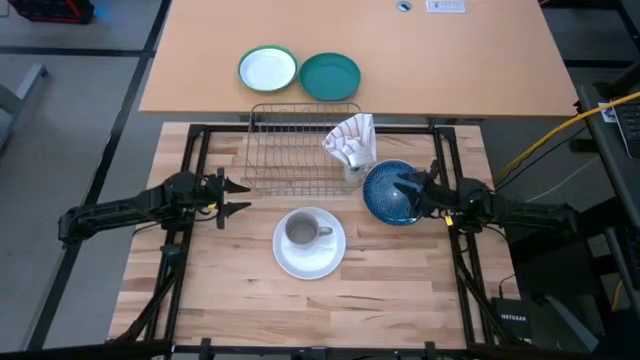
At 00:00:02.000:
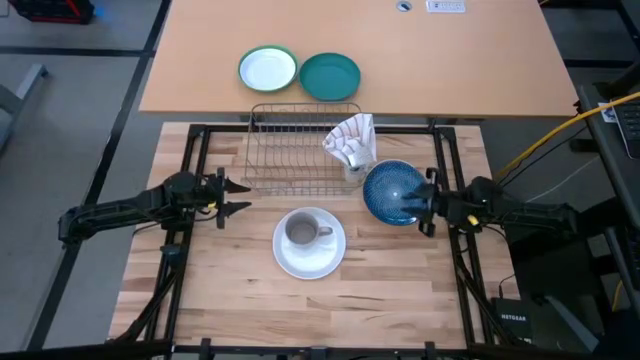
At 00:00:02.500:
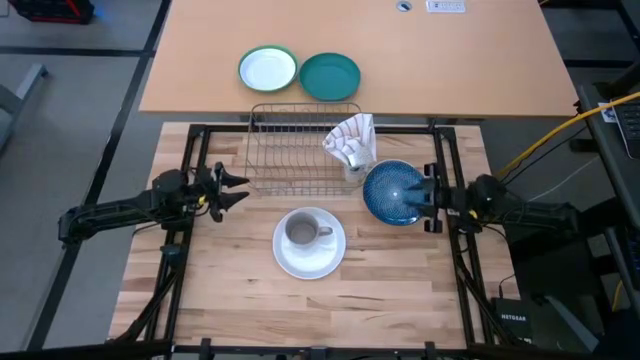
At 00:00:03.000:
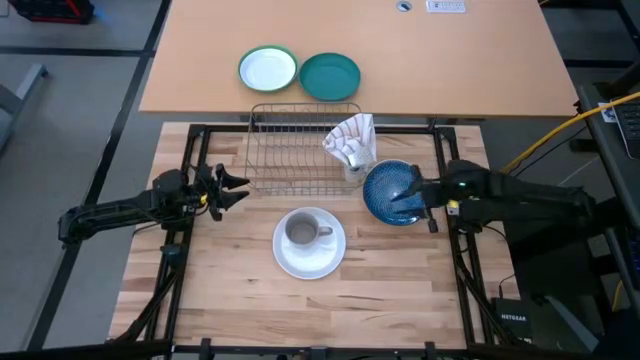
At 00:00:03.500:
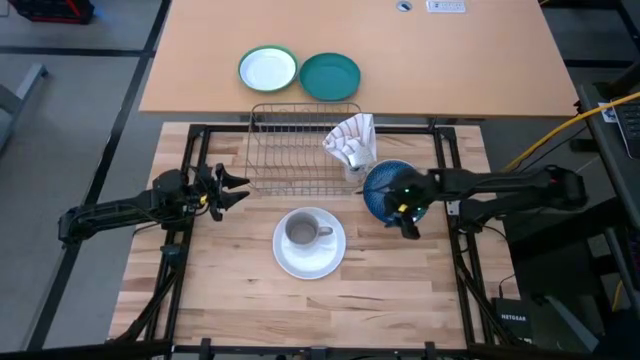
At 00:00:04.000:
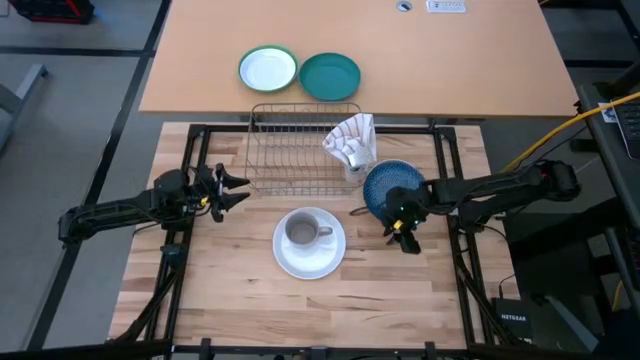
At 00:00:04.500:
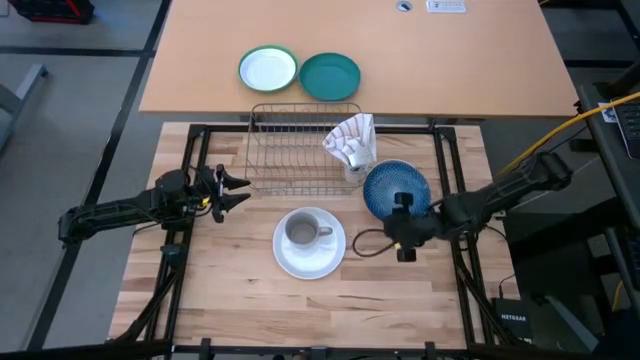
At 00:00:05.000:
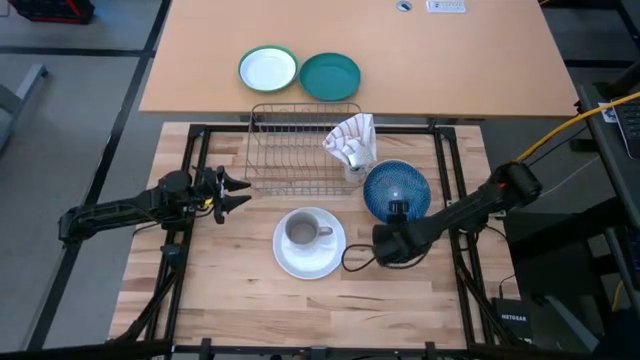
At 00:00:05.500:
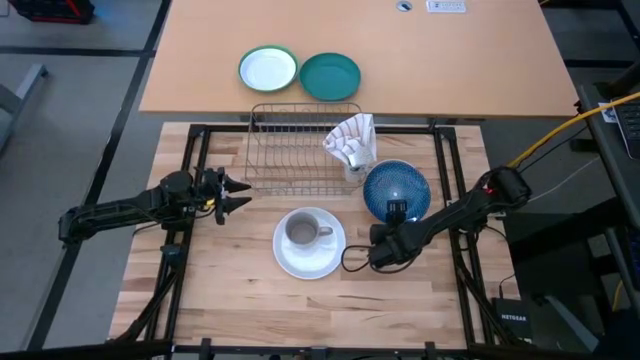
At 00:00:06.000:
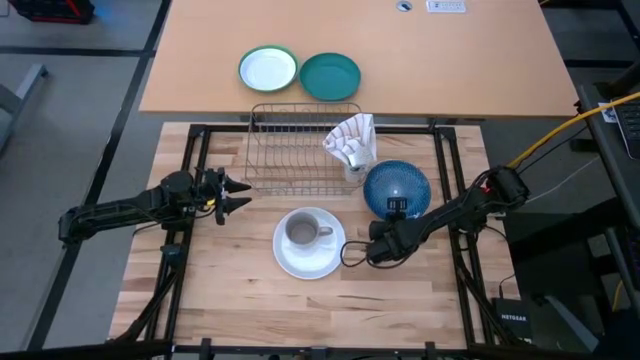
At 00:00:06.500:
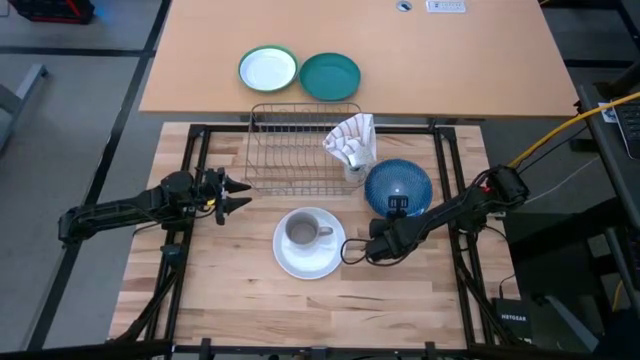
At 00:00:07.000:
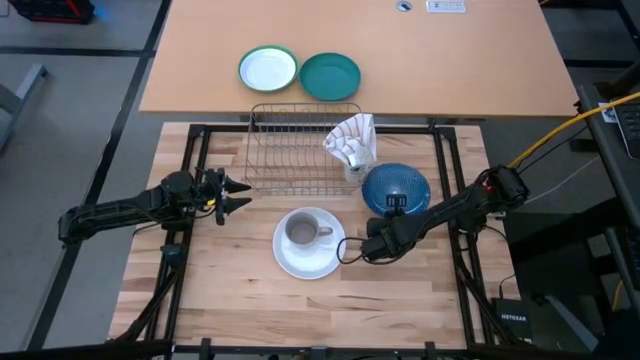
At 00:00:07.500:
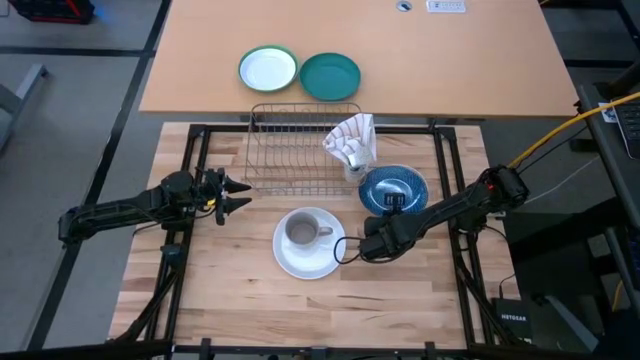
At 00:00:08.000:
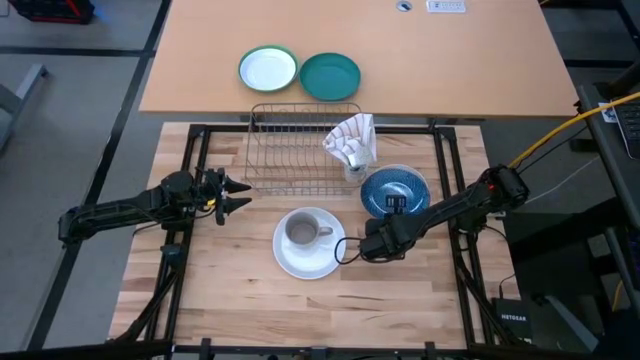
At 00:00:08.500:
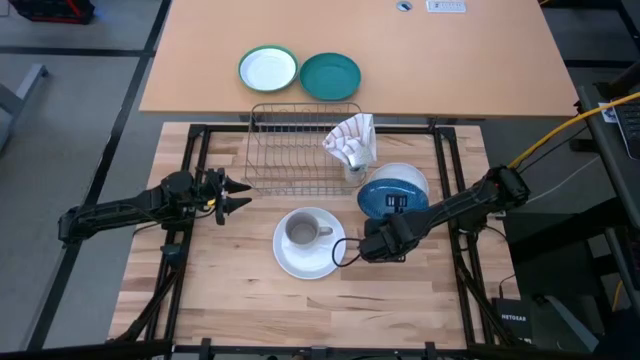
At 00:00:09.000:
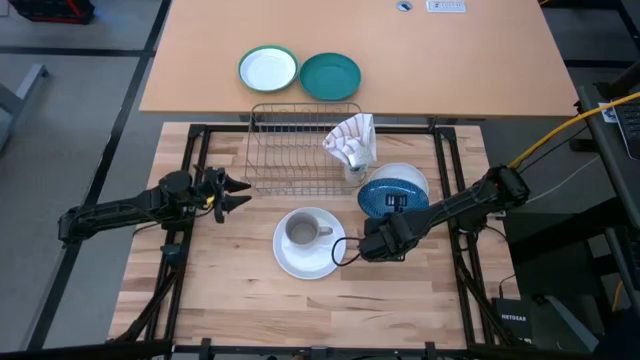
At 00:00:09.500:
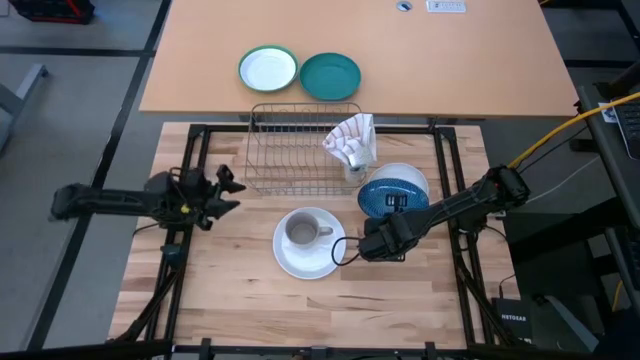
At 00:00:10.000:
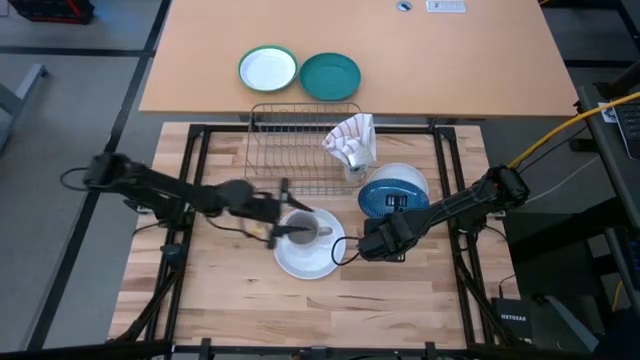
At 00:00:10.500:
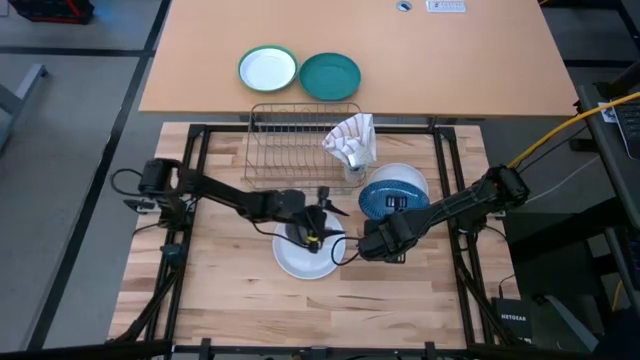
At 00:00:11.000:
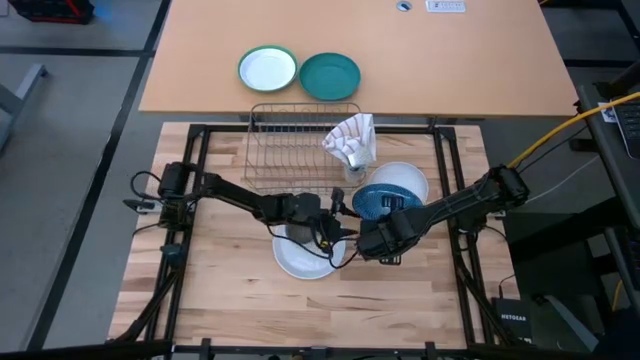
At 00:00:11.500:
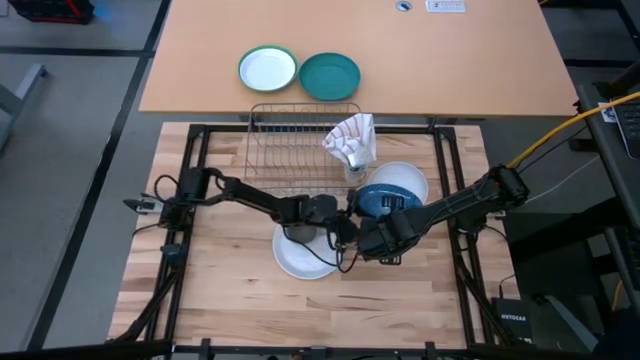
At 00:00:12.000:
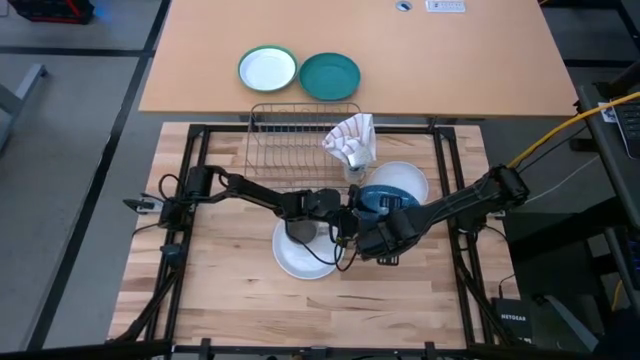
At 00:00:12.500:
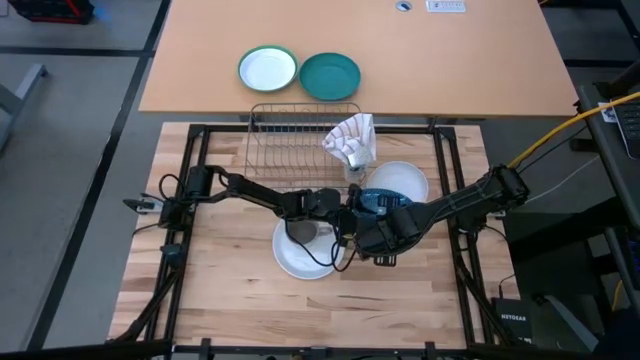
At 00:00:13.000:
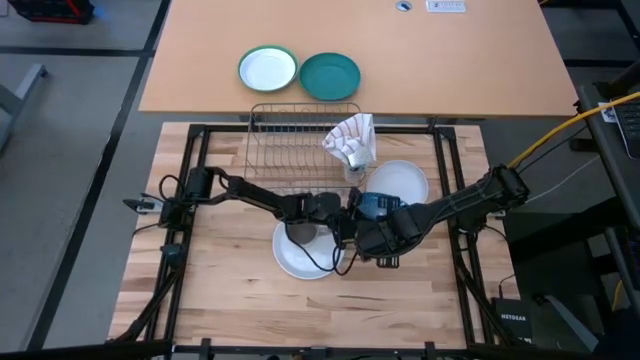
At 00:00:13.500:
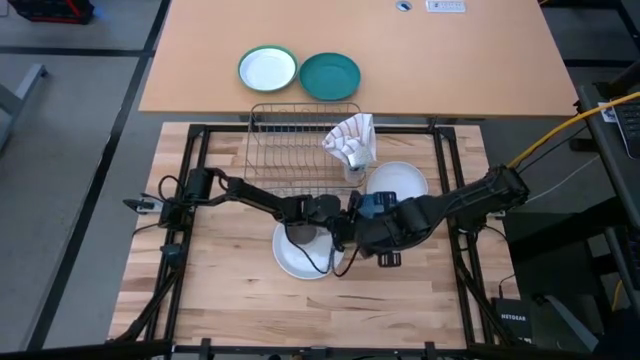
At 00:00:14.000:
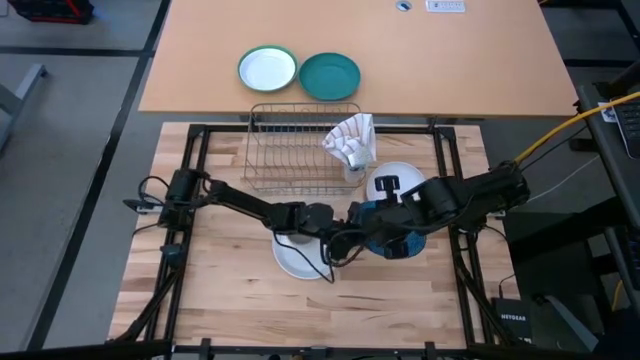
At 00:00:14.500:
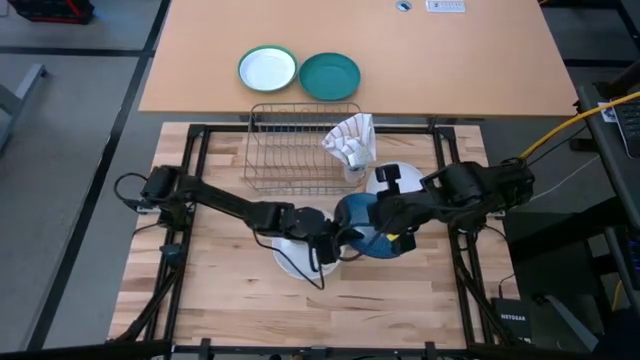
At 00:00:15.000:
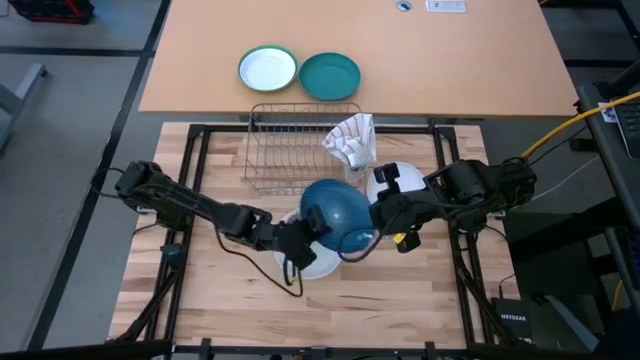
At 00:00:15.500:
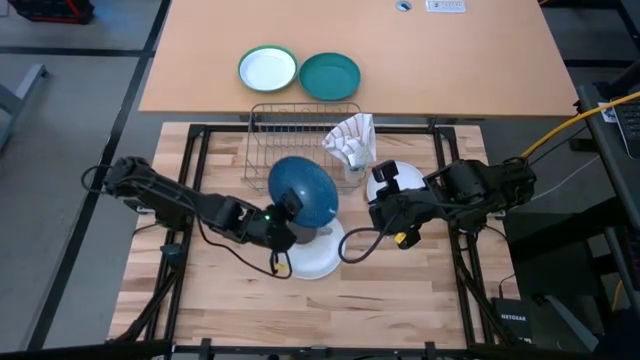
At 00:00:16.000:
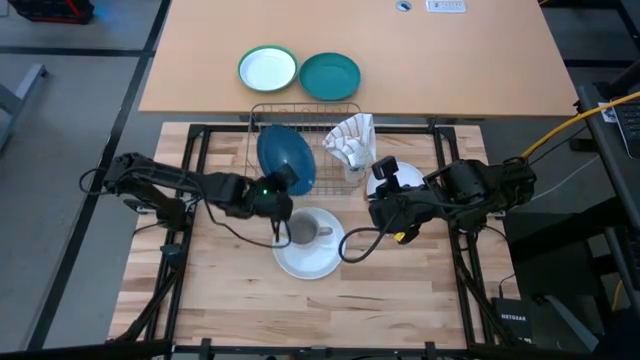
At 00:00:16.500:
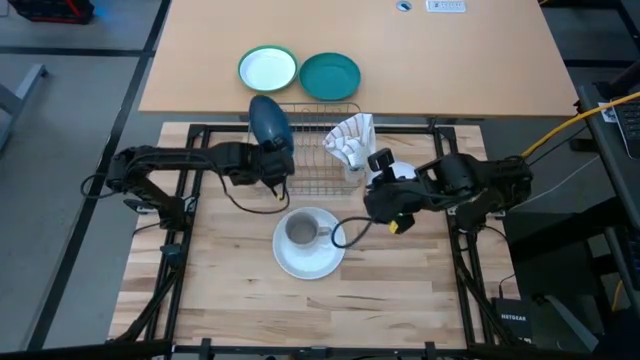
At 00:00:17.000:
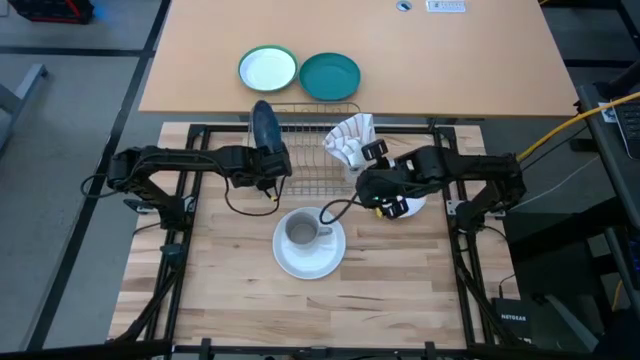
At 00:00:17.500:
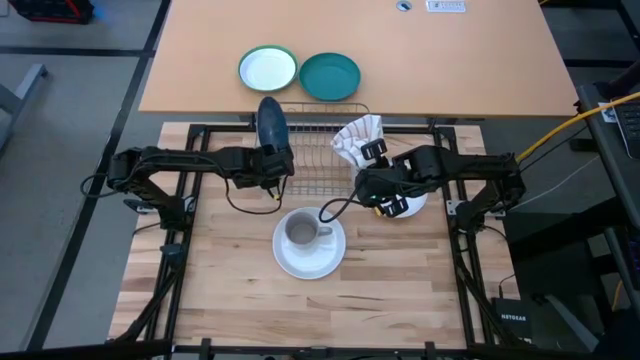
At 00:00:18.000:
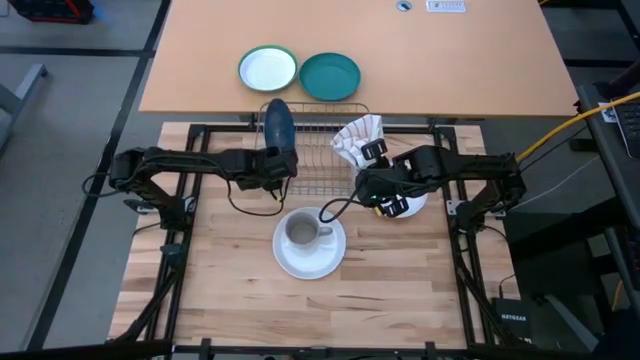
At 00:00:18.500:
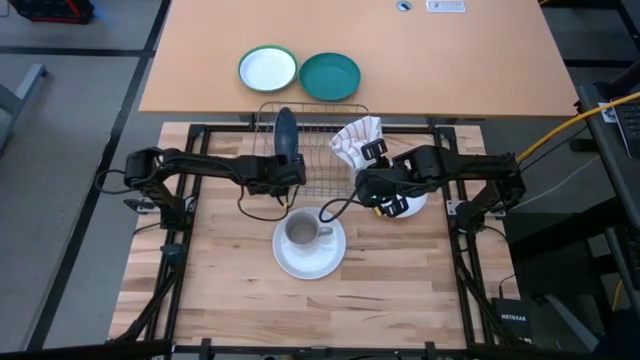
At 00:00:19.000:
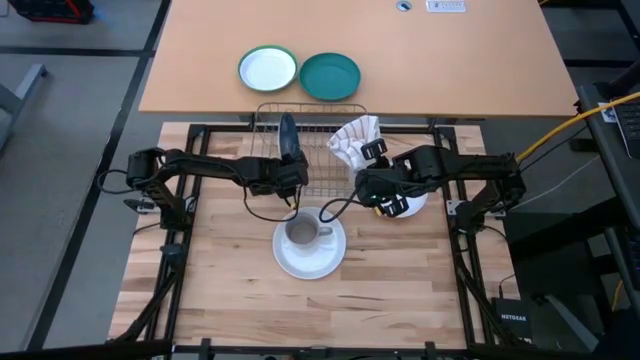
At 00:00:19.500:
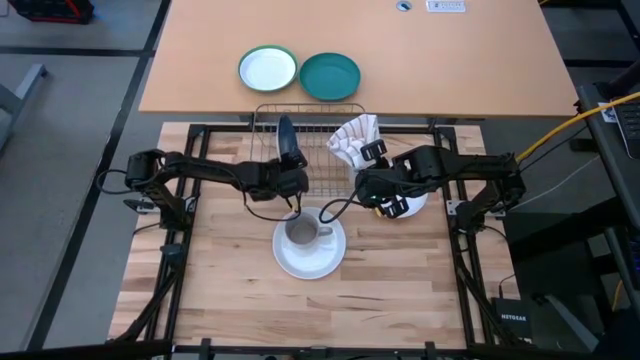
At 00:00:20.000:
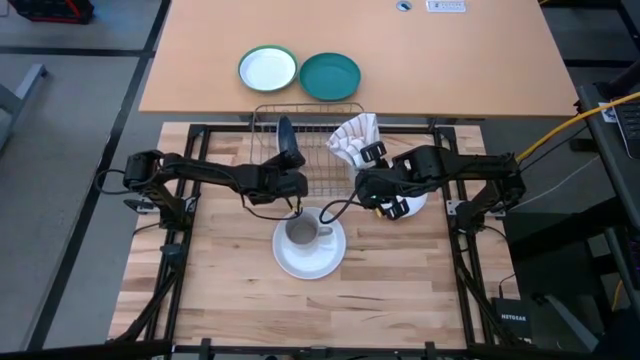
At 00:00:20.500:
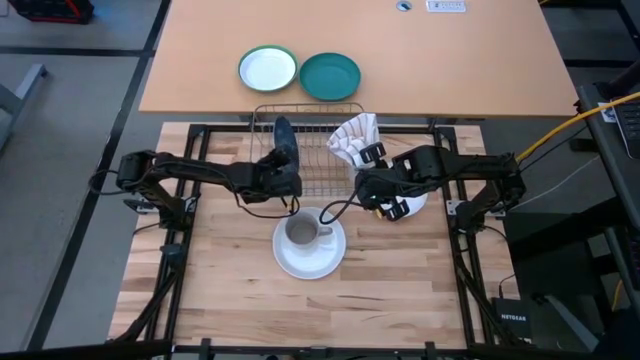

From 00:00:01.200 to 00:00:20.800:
Task: Sort dishes
Put the blue patterned plate in the dish rack
